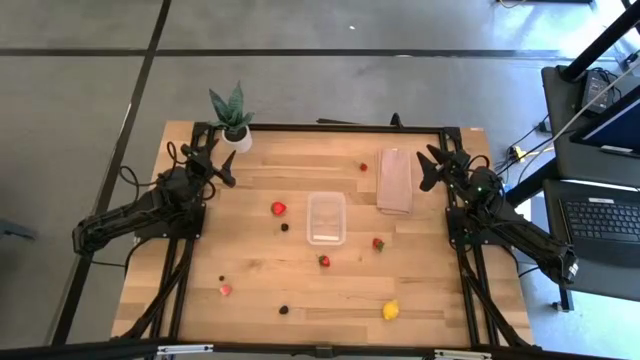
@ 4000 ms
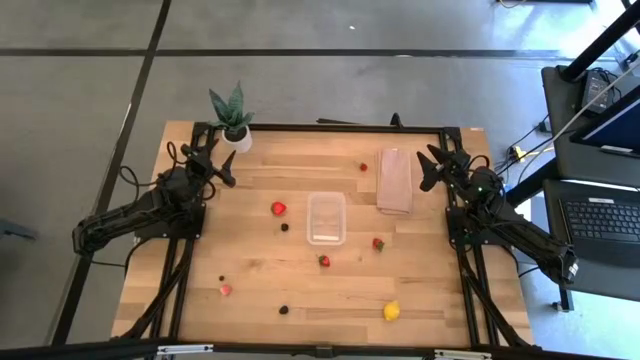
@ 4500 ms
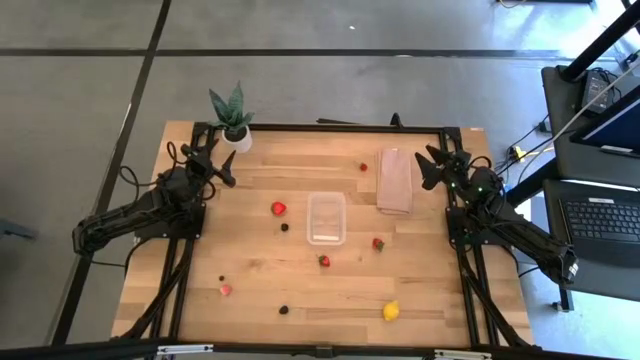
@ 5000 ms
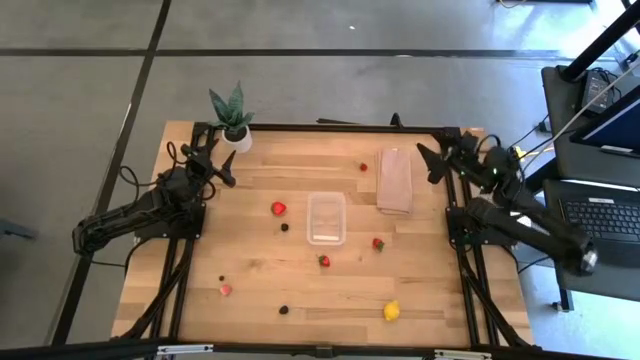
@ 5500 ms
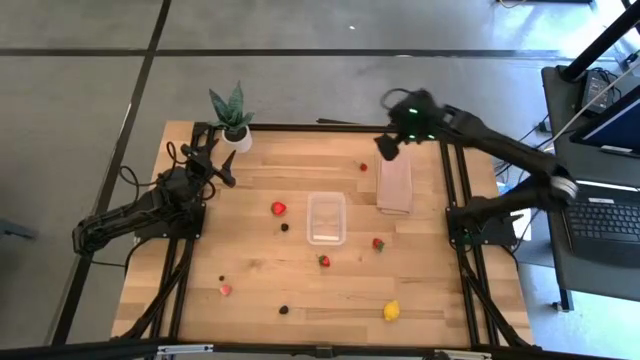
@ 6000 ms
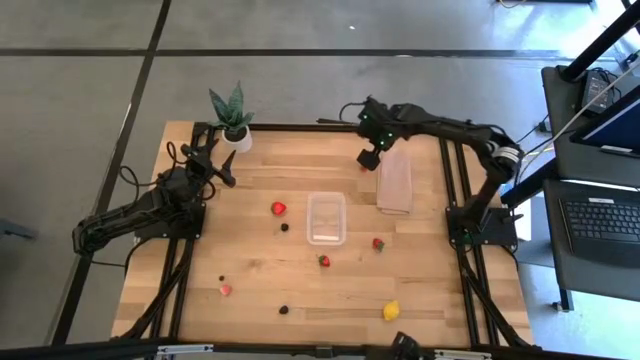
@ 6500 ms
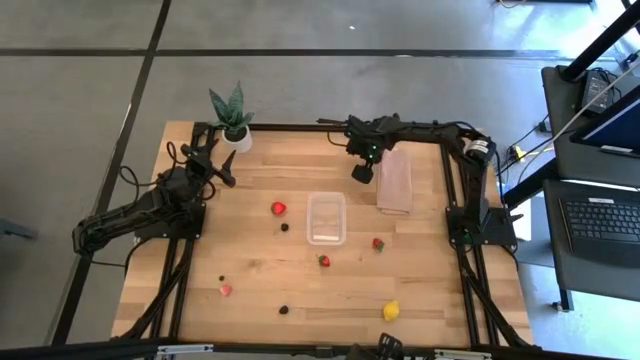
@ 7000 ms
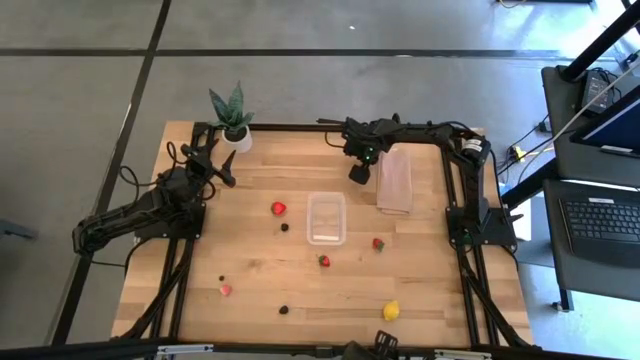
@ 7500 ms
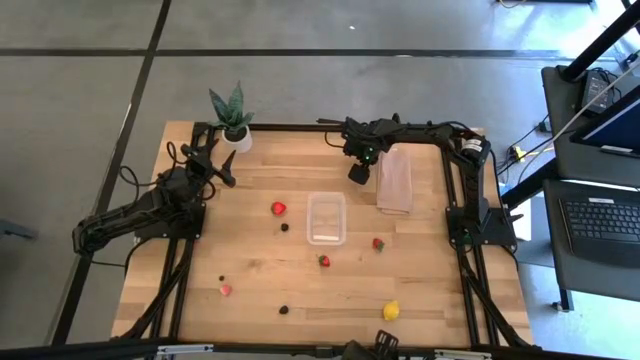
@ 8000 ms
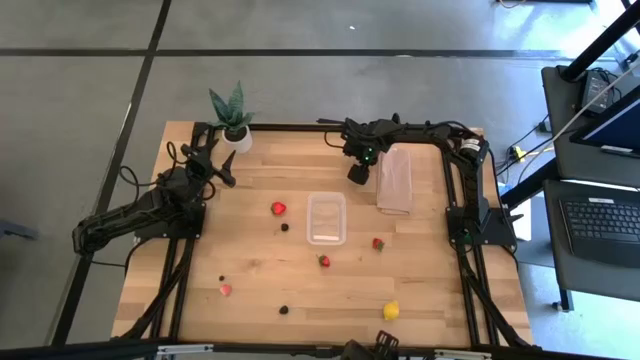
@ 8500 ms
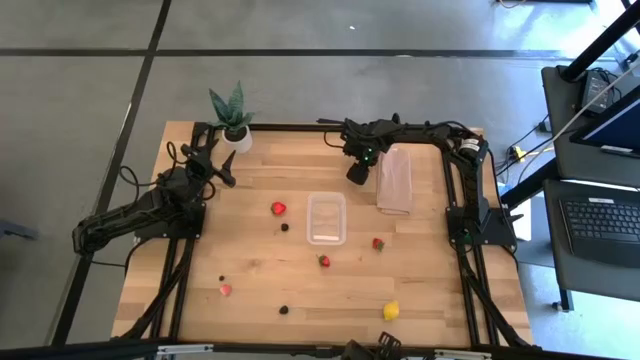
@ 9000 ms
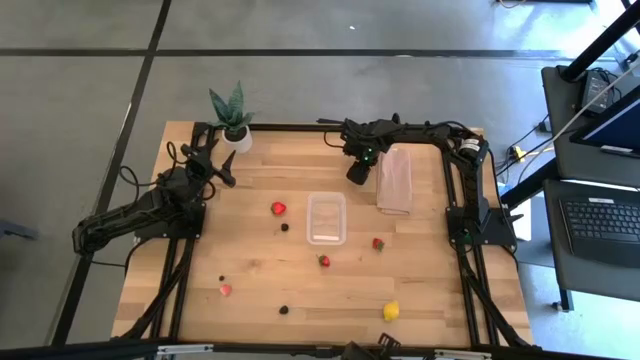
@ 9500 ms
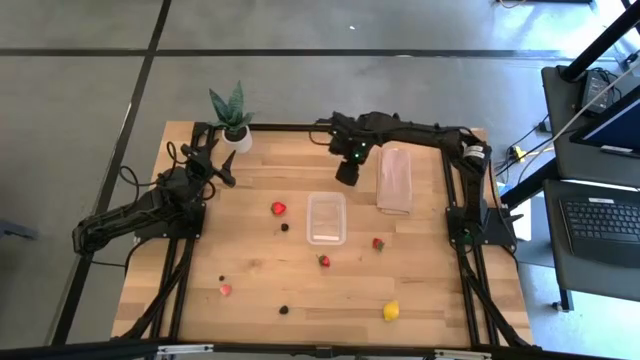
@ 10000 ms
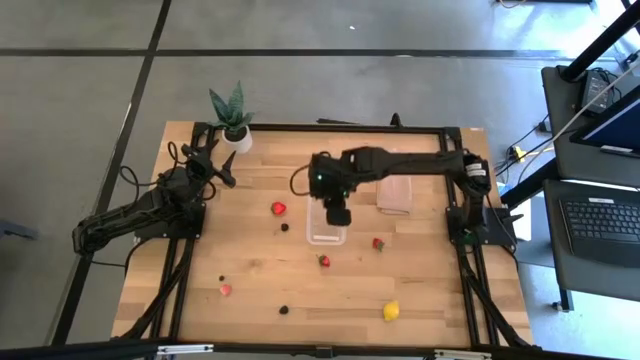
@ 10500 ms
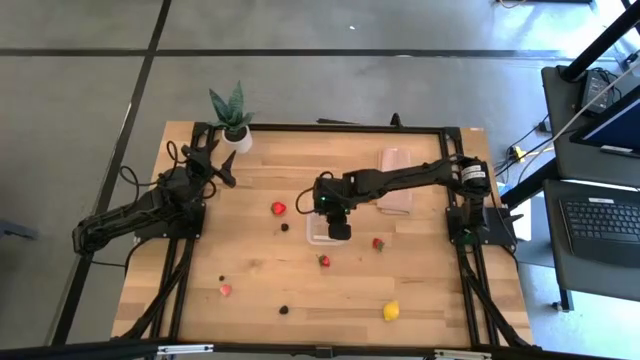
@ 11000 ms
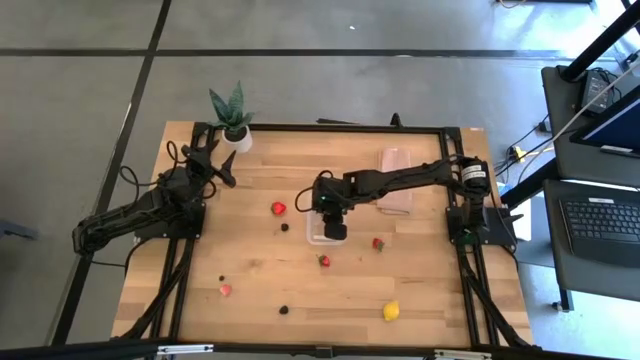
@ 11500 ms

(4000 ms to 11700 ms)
Task: Pick and placing Produce into tupperware
Put the red strawberry into the transparent bin

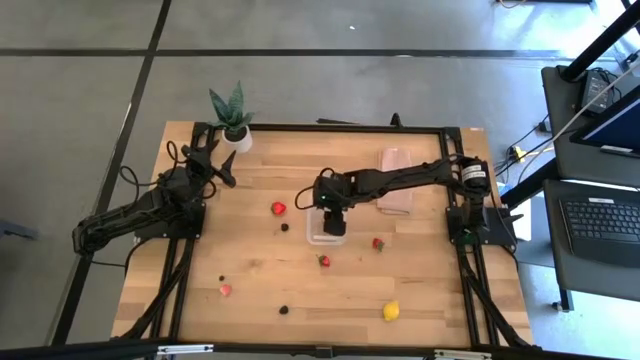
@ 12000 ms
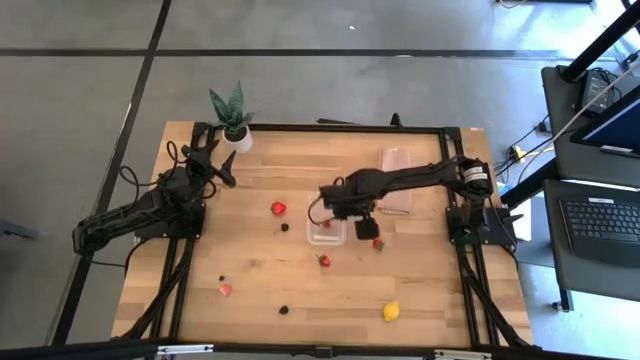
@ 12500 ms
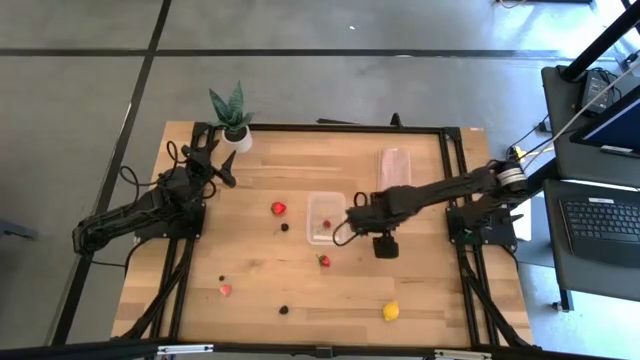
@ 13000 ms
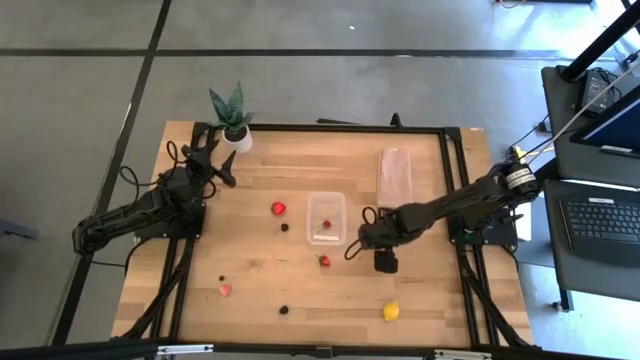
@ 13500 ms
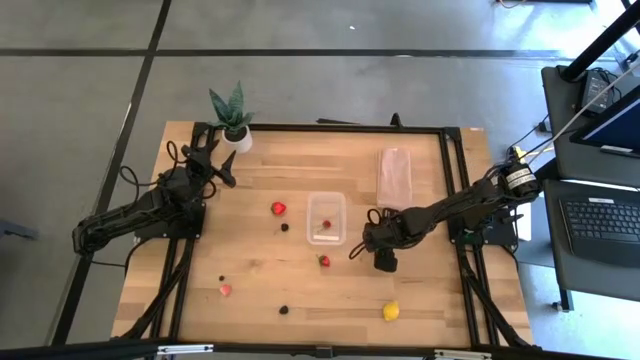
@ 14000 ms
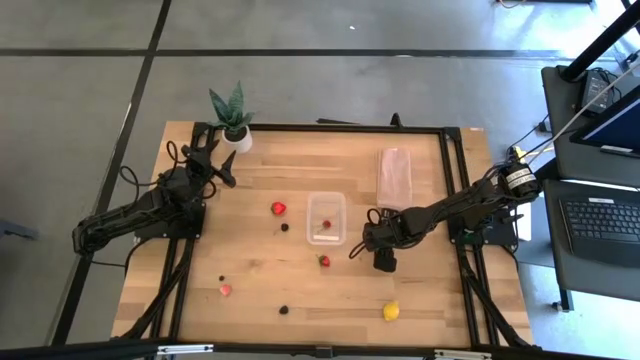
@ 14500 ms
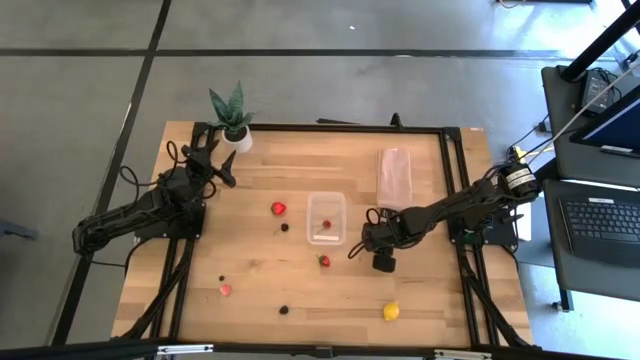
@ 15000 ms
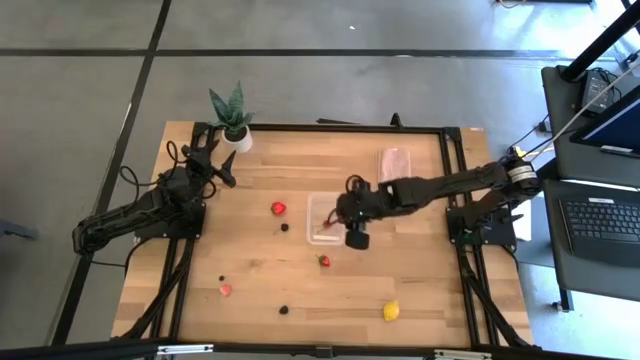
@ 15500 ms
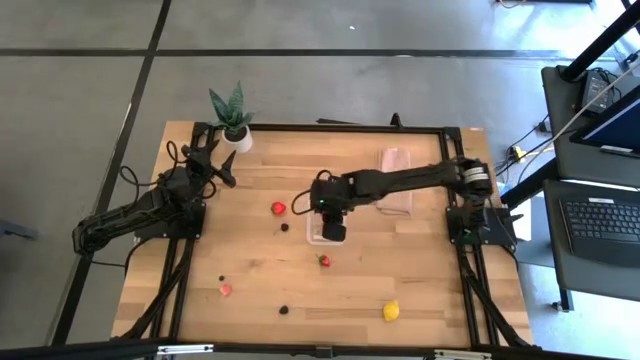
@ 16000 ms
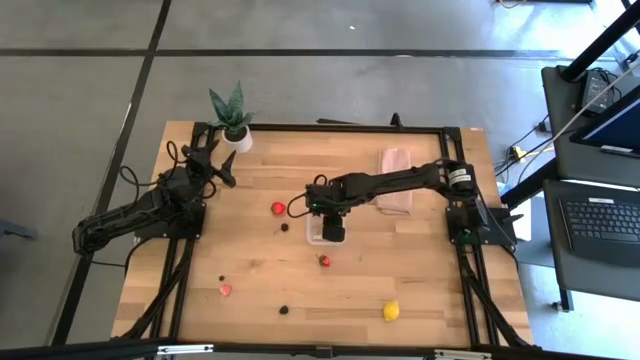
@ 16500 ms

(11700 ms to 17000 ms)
Put the red strawberry into the transparent bin

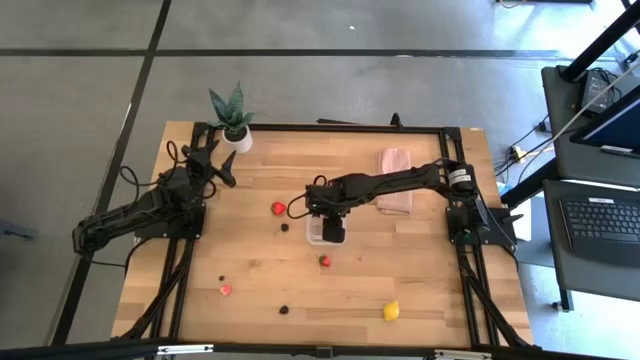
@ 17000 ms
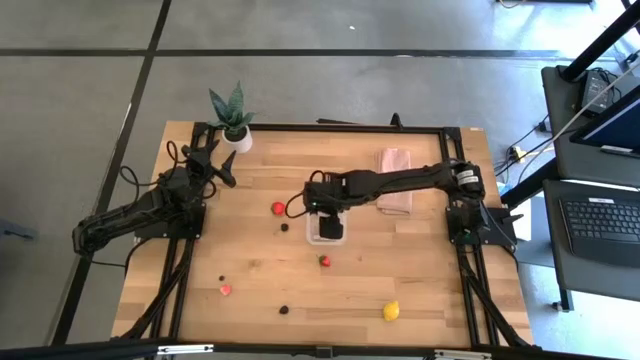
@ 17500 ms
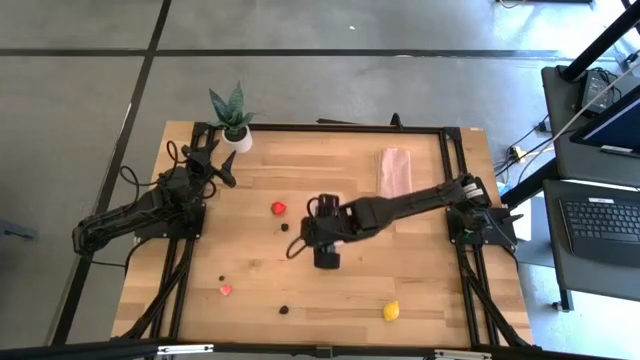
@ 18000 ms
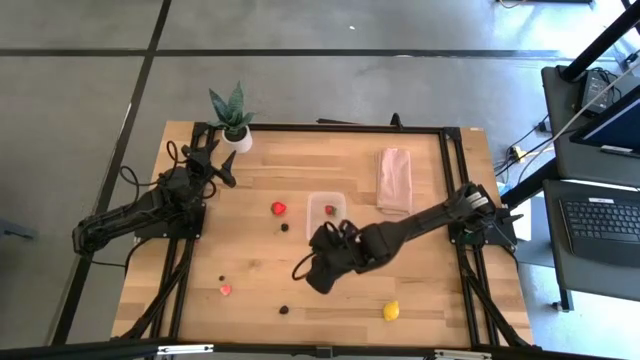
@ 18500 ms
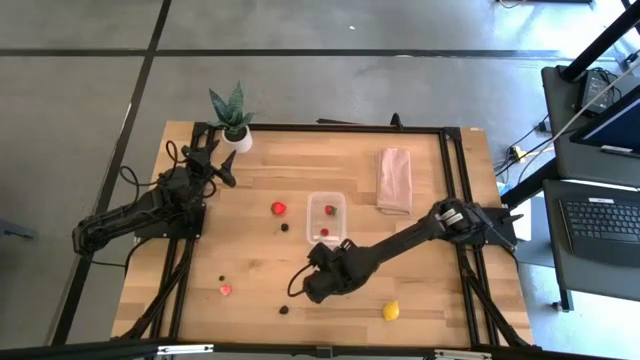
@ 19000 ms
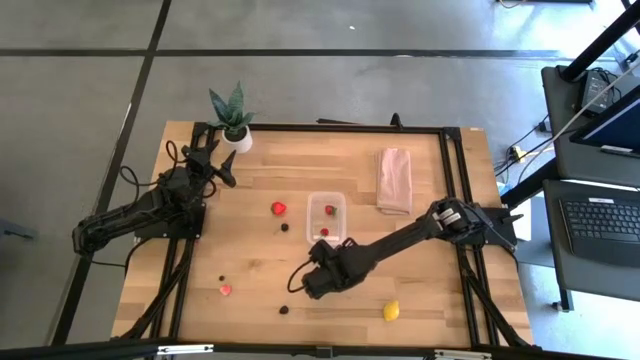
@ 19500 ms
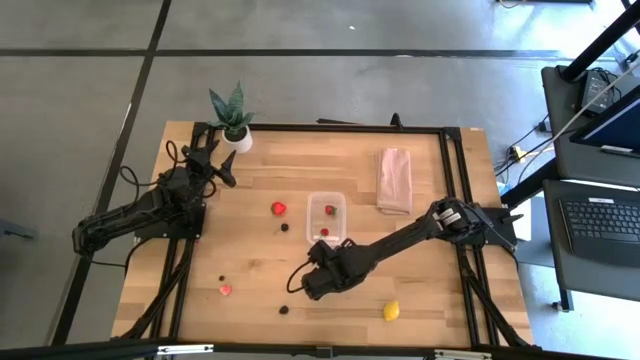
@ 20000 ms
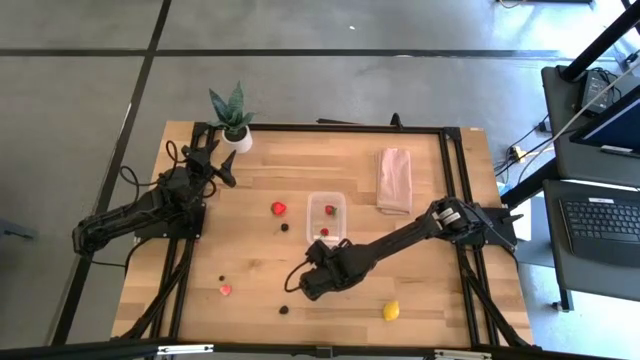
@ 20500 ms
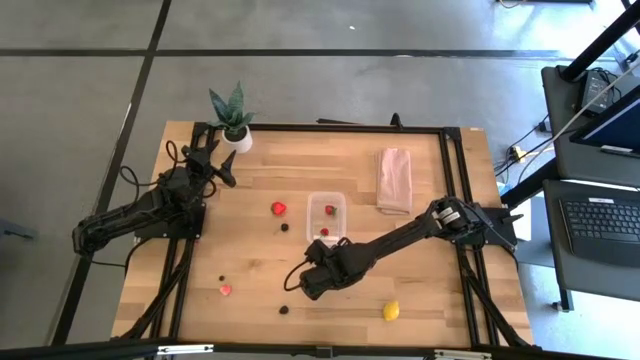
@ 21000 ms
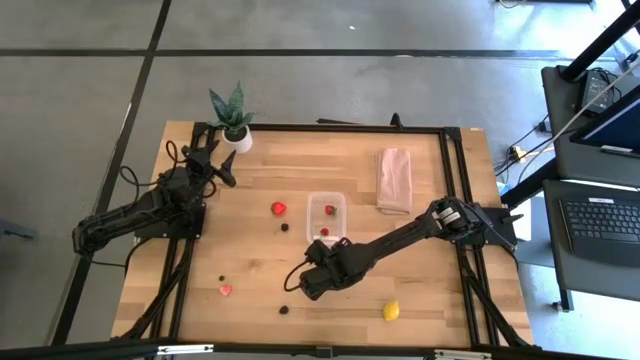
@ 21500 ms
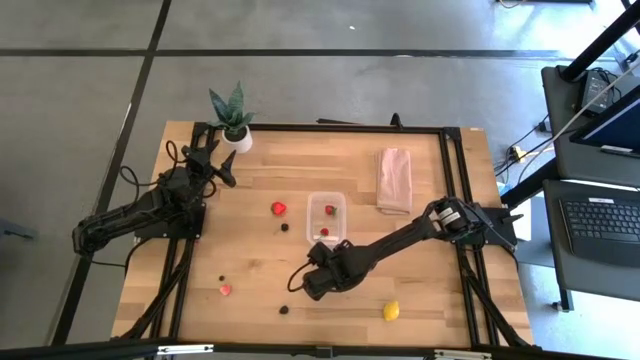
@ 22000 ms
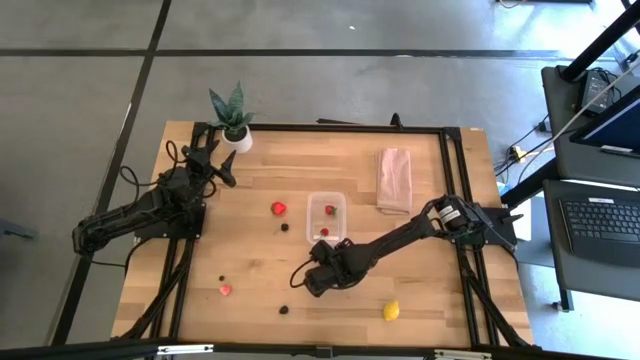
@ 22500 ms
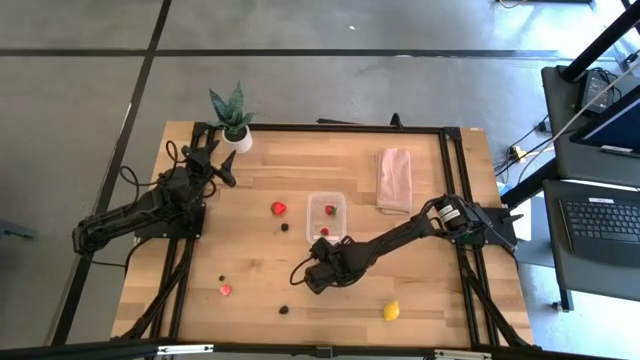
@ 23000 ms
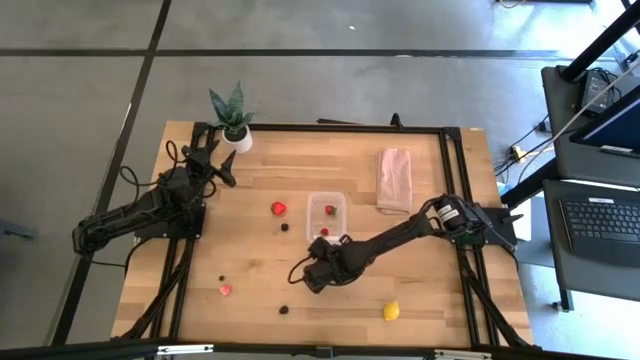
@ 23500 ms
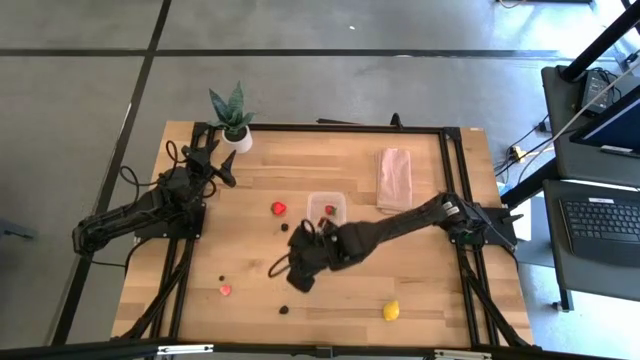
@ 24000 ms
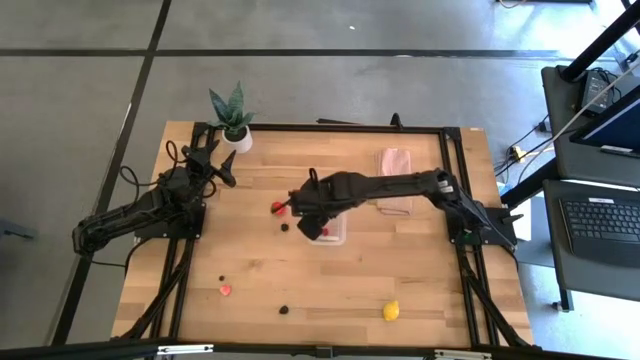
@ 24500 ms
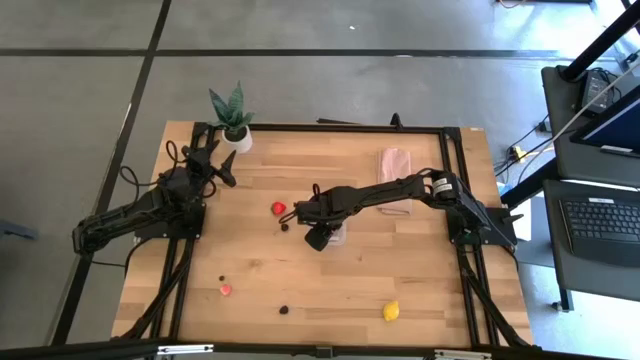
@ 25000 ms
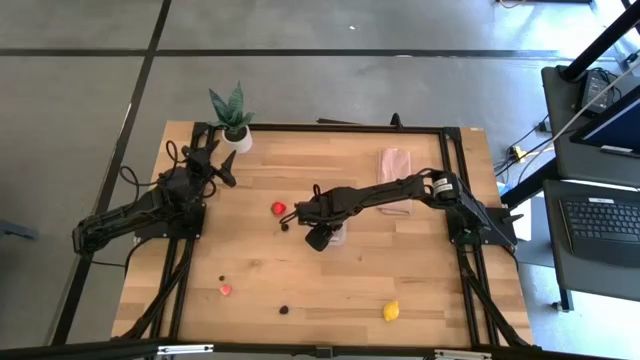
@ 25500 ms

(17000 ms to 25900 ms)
Put the red strawberry into the transparent bin
